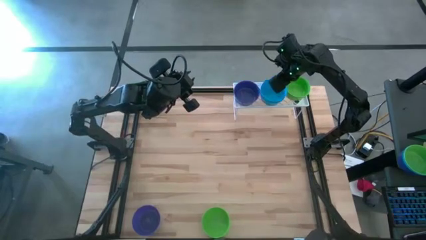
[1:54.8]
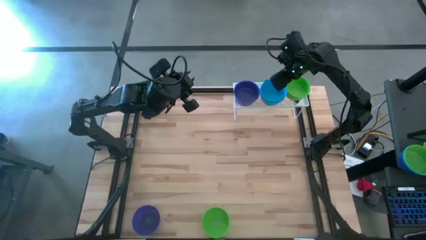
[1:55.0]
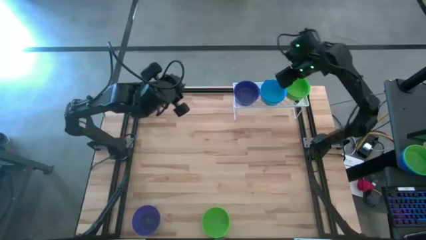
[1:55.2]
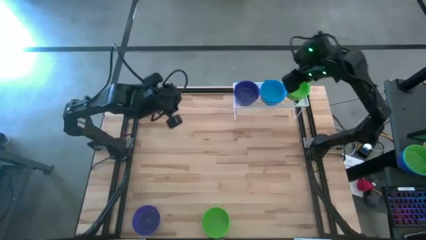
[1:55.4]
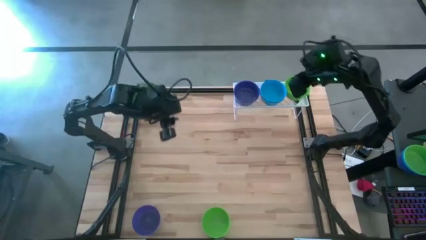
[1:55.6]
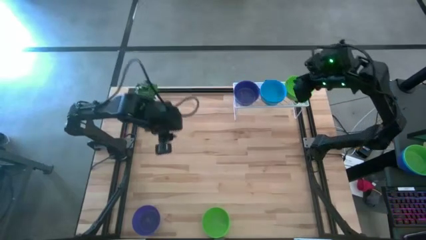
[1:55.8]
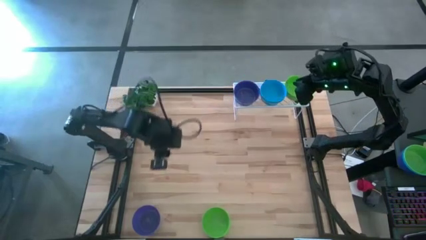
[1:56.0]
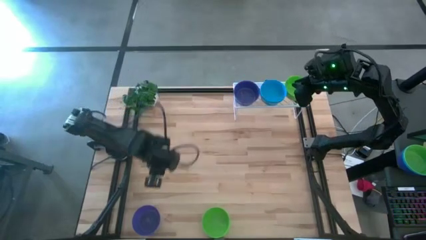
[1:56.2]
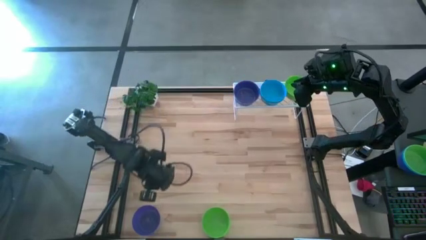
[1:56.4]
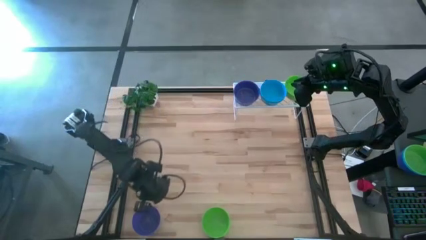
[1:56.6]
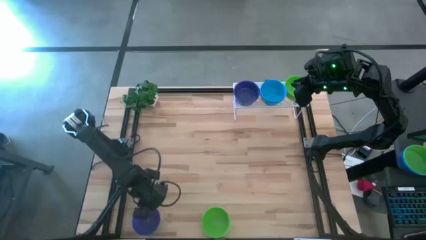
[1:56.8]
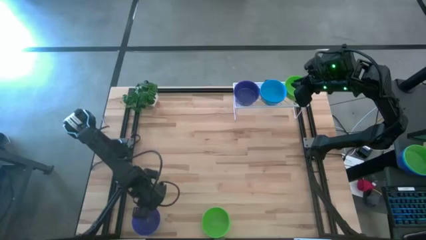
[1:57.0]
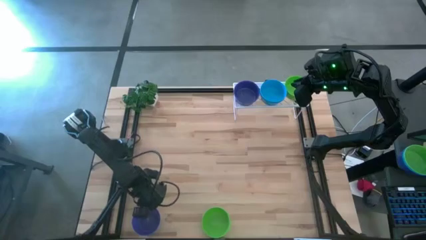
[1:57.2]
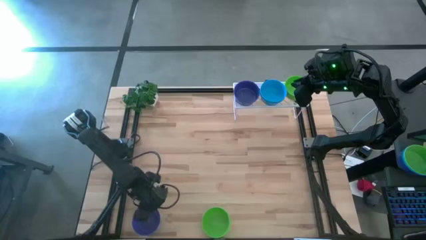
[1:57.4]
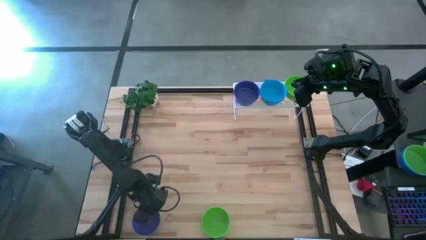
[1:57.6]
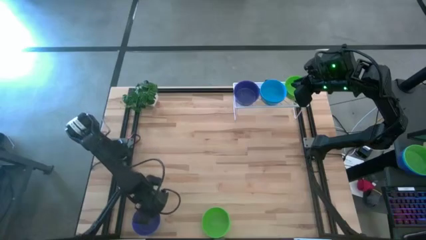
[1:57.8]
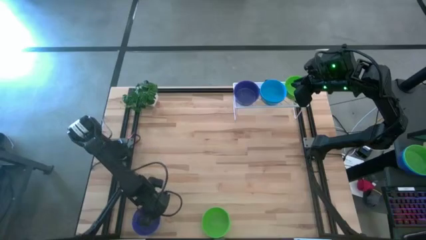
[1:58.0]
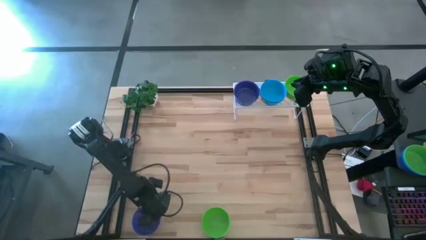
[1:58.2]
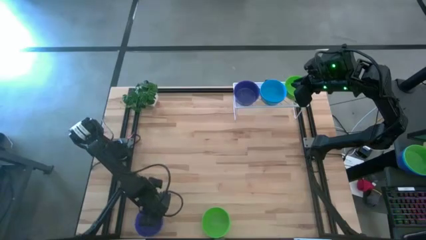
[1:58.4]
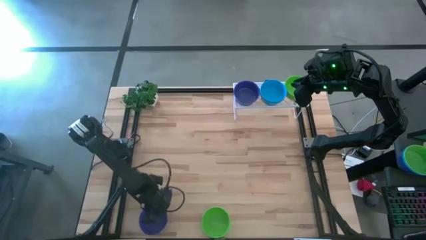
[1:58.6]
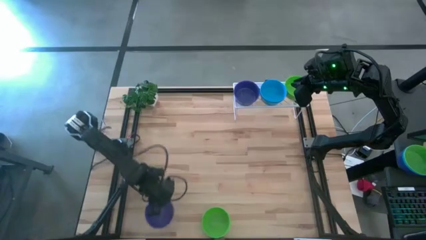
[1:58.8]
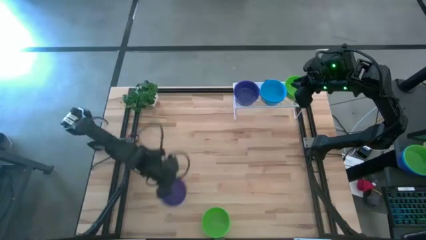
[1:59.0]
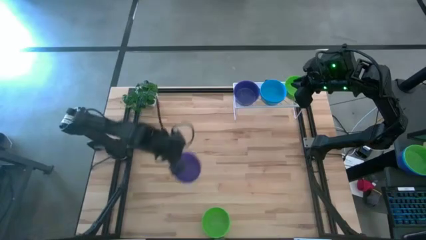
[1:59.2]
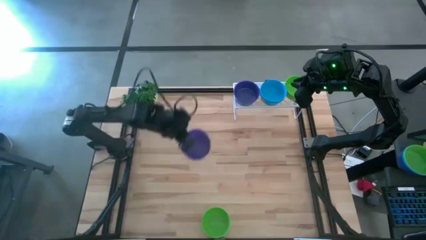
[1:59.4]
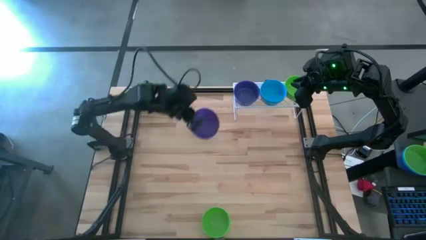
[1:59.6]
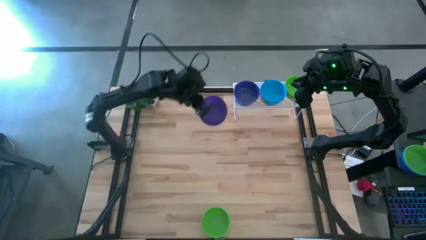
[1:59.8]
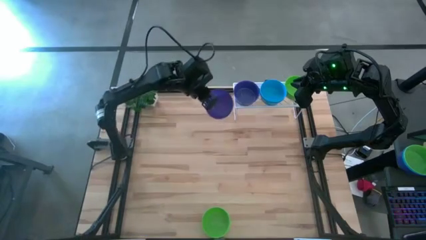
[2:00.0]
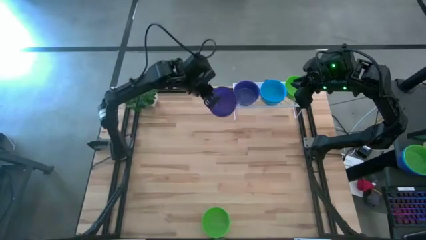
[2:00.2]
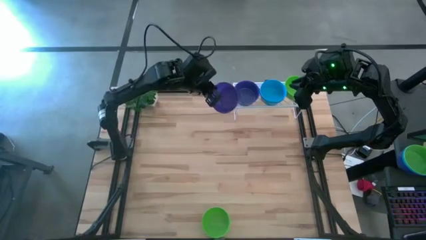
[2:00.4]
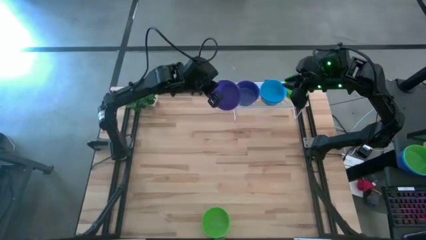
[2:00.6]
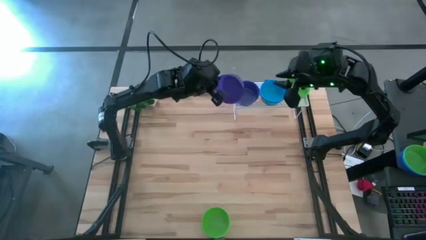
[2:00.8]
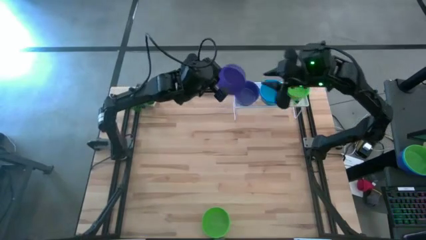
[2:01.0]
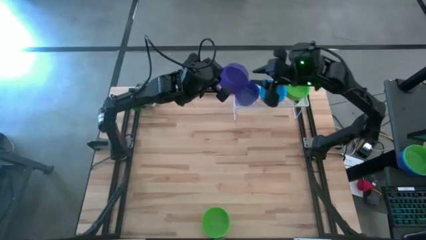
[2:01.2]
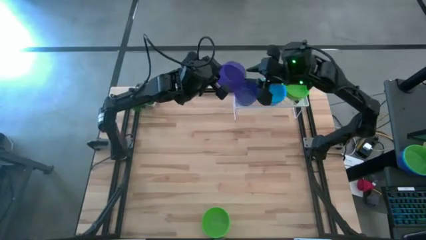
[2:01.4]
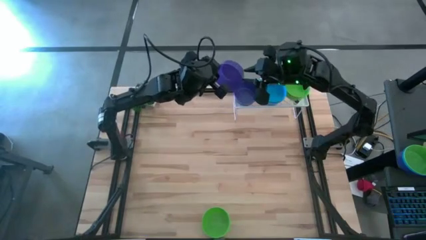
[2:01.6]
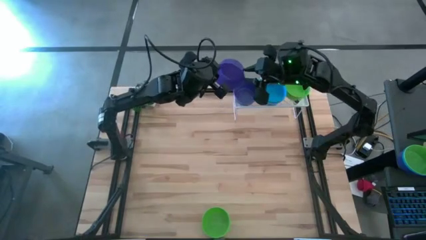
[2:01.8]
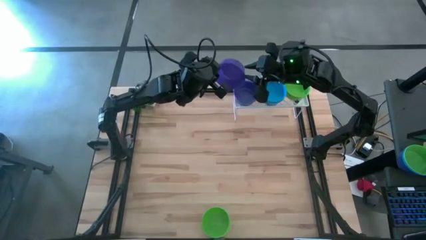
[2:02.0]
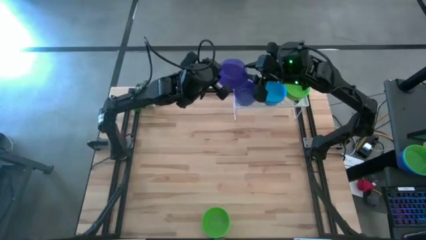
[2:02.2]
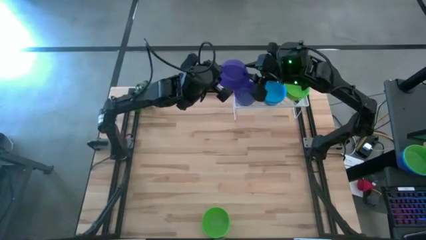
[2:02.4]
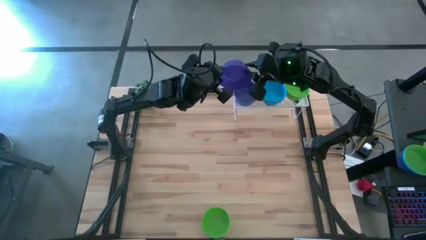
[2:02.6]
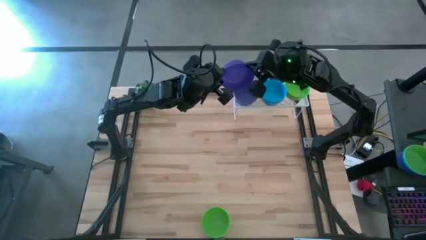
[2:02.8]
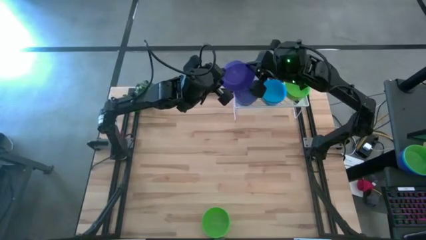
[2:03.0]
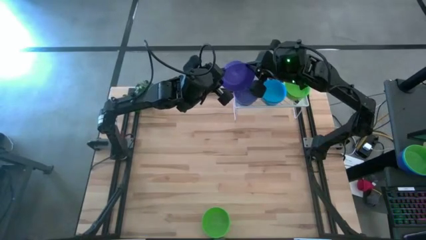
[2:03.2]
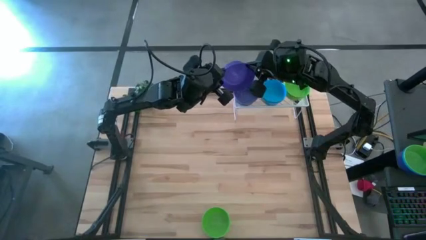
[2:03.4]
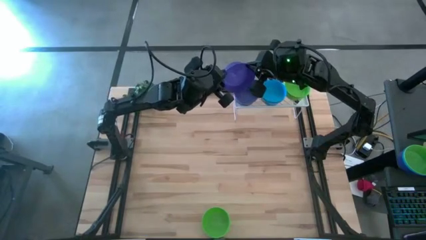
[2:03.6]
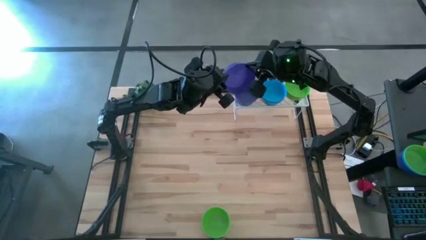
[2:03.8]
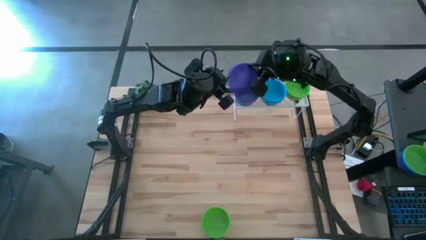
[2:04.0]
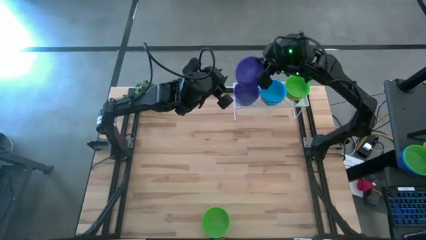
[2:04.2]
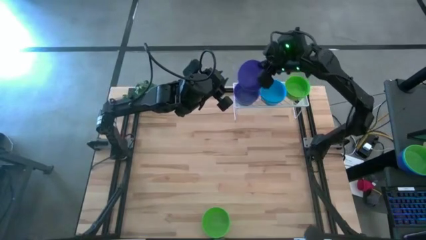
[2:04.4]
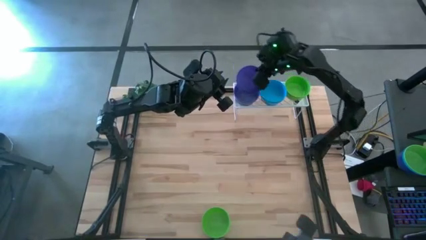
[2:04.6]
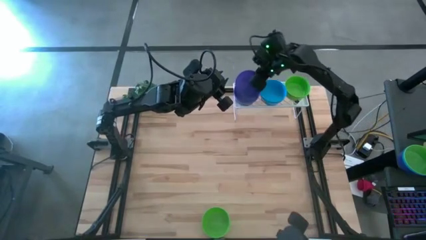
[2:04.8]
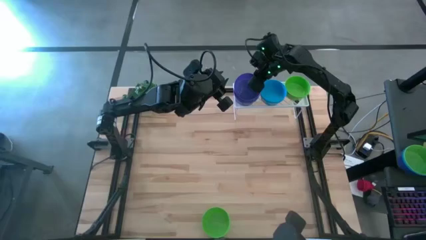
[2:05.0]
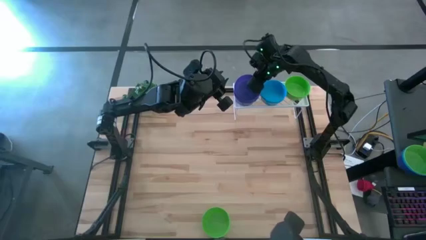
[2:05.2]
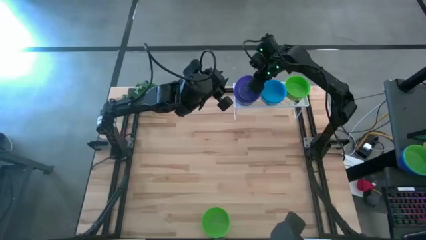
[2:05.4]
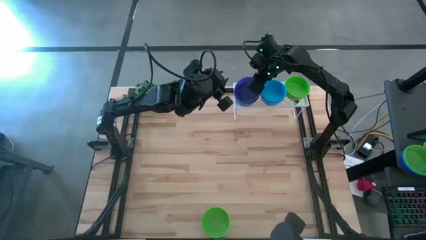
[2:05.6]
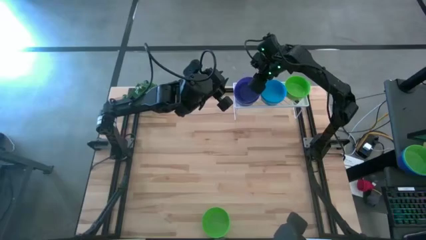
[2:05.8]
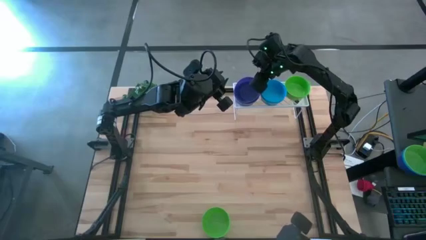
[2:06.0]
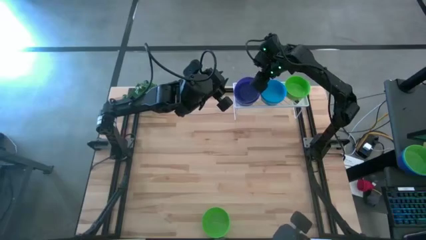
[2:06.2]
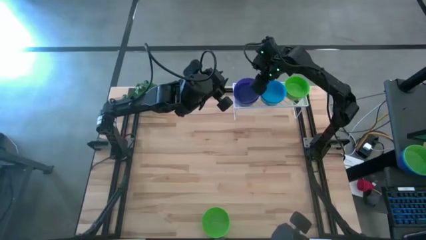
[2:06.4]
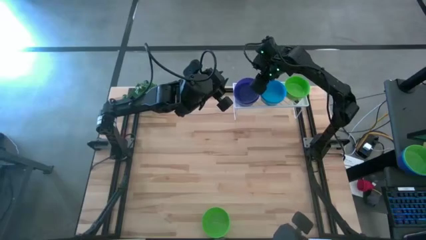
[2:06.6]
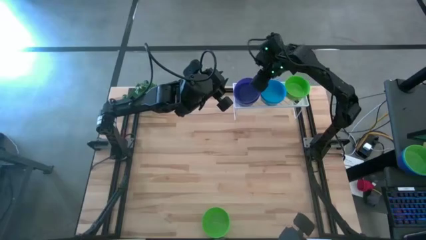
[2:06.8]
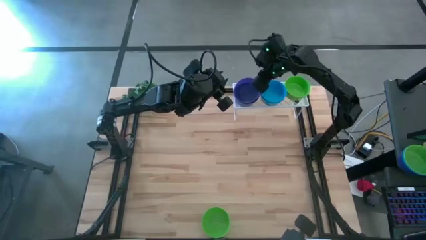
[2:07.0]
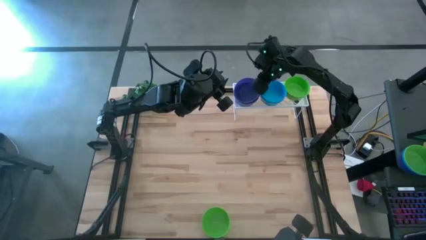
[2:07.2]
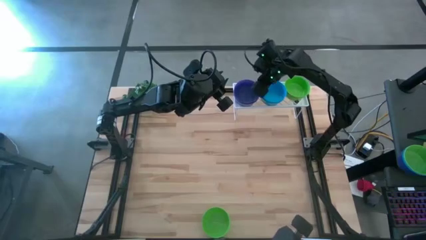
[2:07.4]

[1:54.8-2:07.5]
Task: Pick & Place Mini bowls
Stack the violet bowl on top of the violet bowls on the shelf
